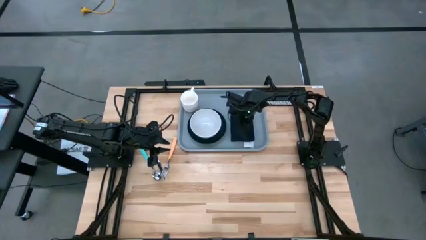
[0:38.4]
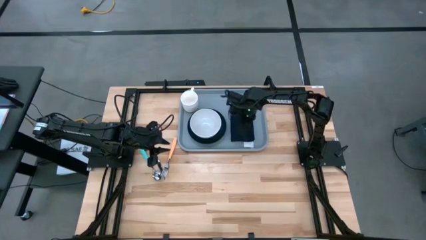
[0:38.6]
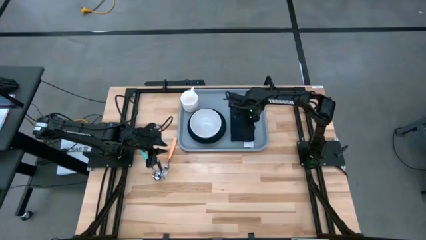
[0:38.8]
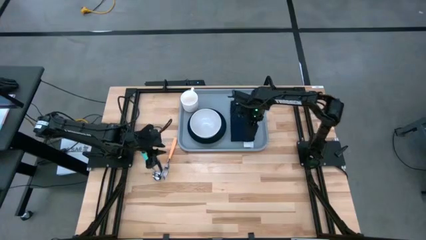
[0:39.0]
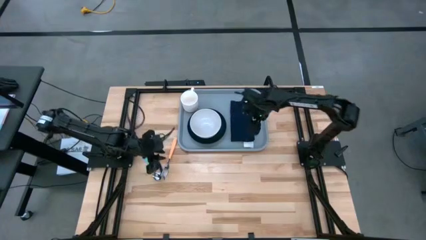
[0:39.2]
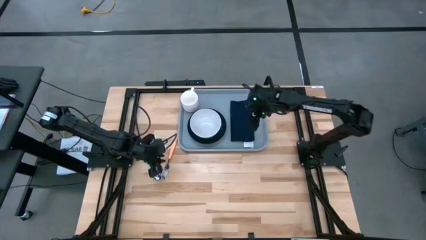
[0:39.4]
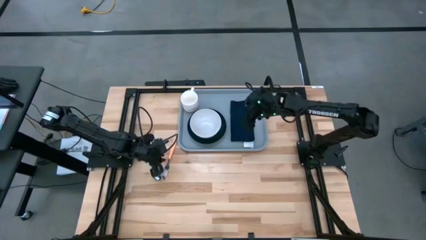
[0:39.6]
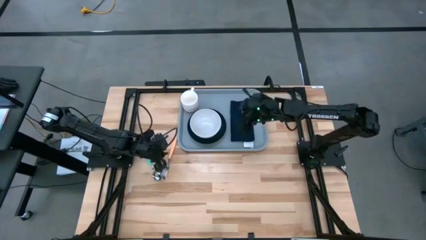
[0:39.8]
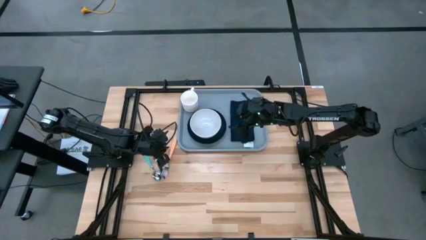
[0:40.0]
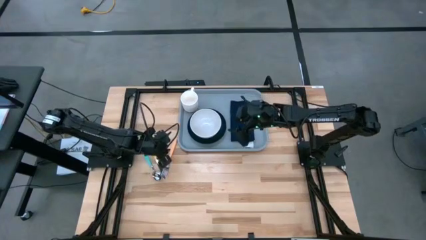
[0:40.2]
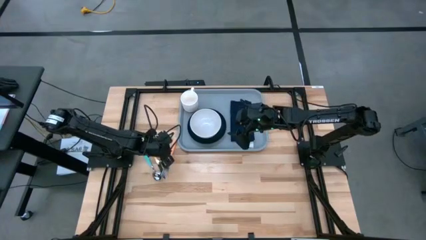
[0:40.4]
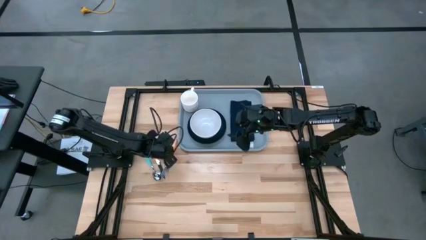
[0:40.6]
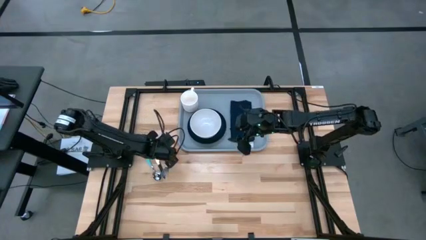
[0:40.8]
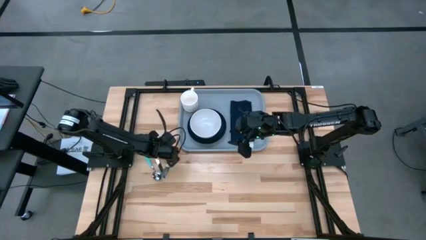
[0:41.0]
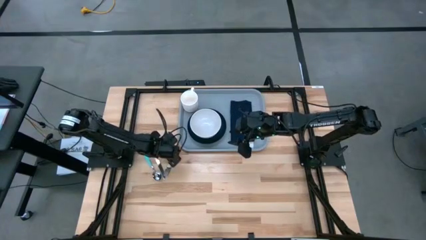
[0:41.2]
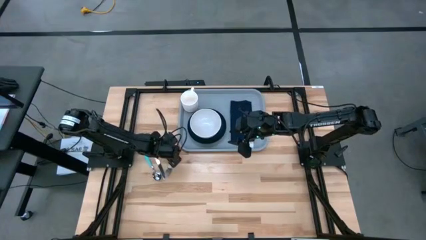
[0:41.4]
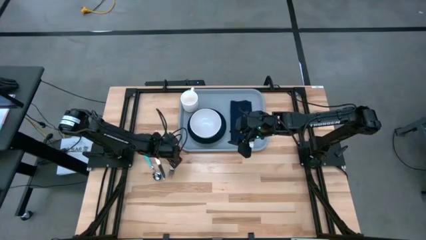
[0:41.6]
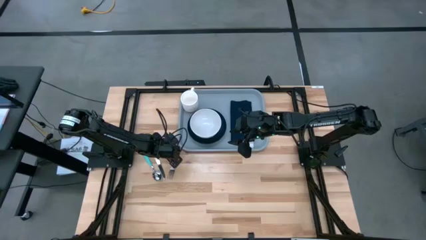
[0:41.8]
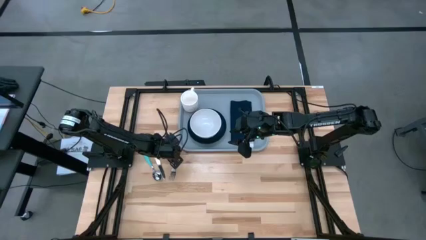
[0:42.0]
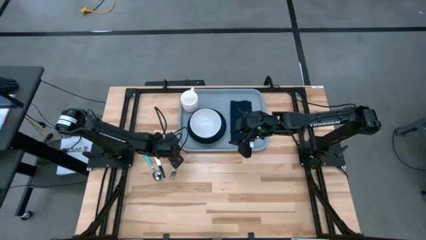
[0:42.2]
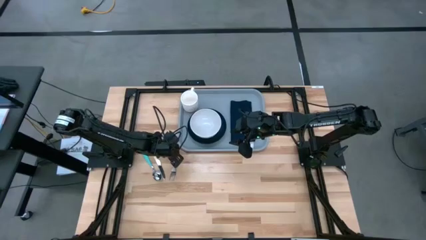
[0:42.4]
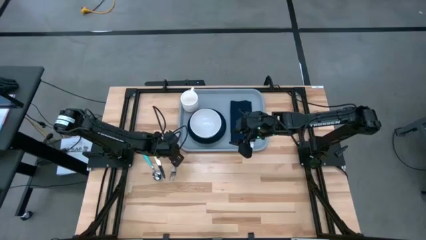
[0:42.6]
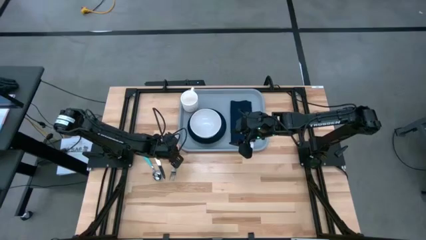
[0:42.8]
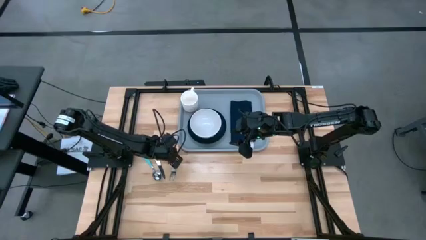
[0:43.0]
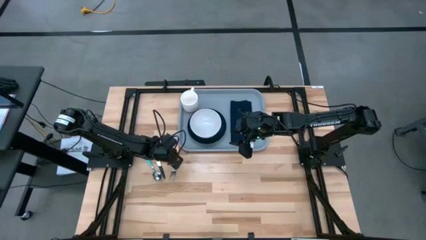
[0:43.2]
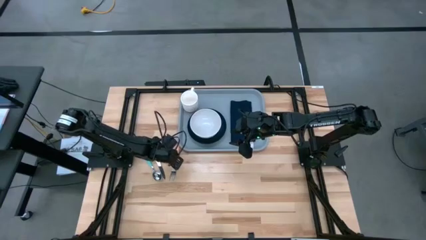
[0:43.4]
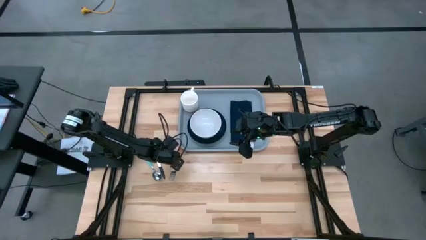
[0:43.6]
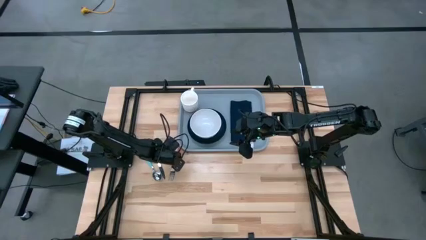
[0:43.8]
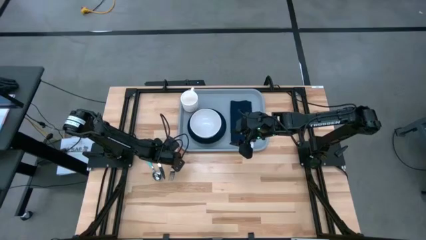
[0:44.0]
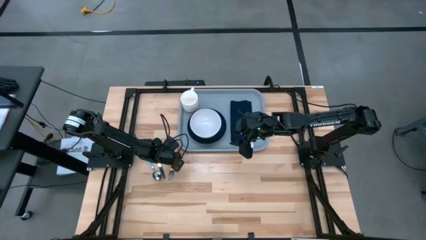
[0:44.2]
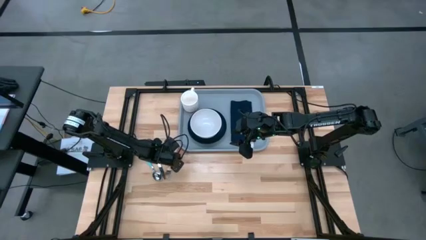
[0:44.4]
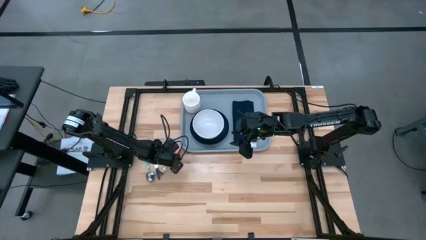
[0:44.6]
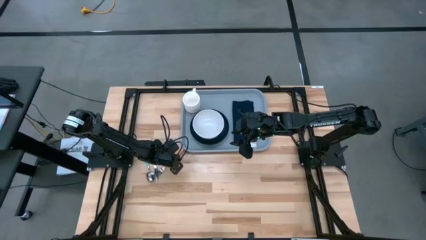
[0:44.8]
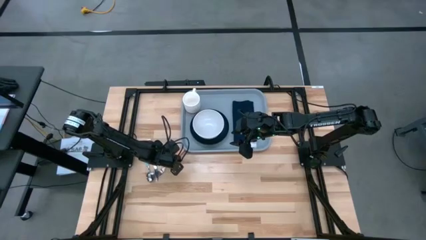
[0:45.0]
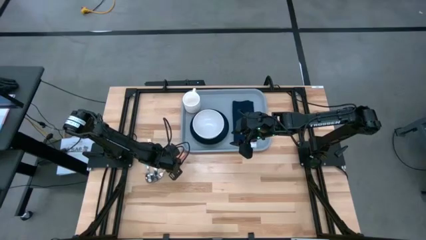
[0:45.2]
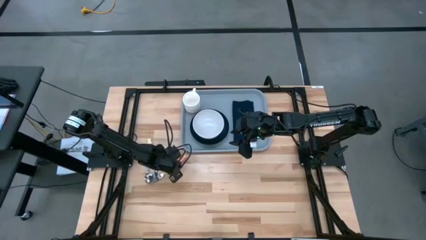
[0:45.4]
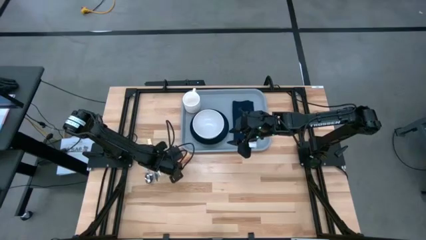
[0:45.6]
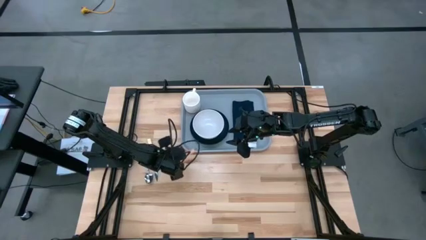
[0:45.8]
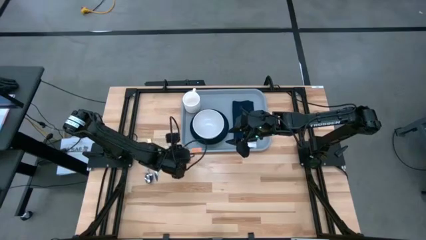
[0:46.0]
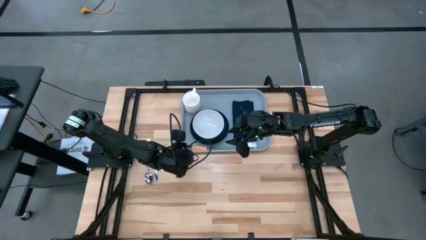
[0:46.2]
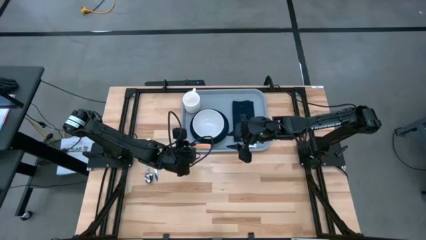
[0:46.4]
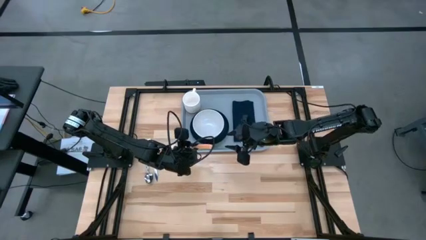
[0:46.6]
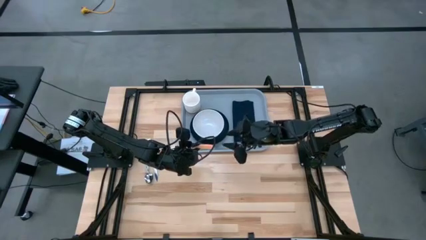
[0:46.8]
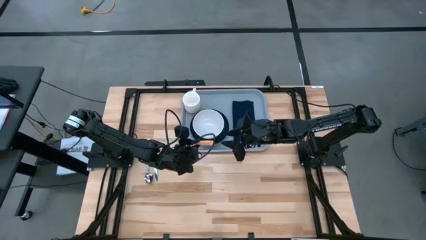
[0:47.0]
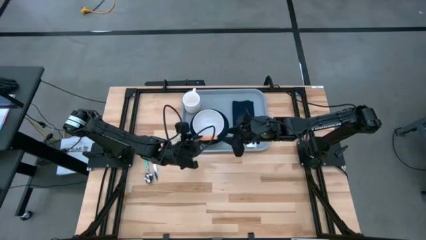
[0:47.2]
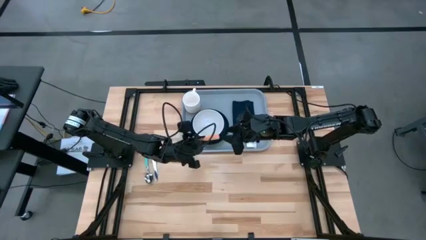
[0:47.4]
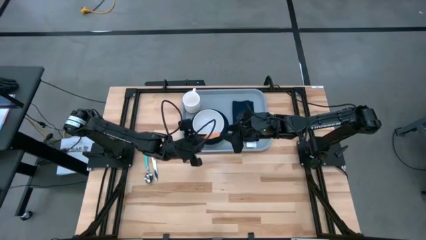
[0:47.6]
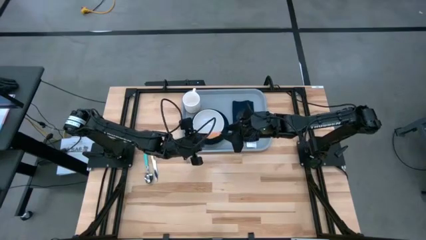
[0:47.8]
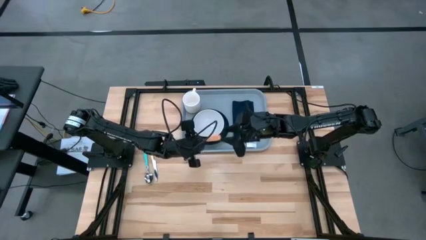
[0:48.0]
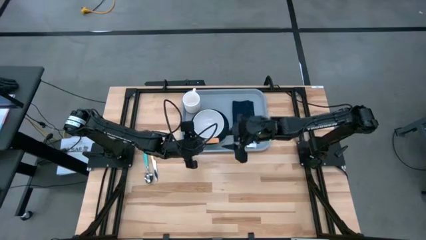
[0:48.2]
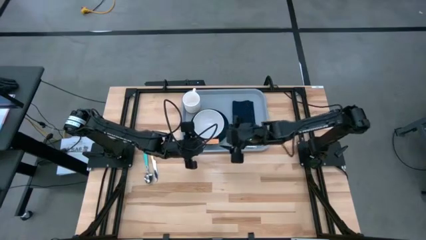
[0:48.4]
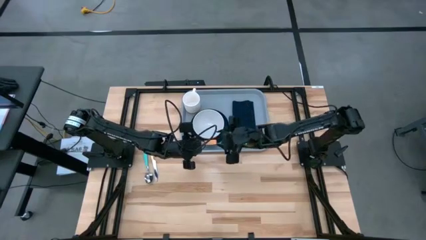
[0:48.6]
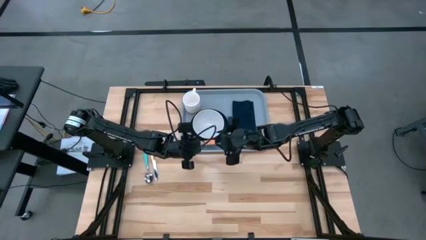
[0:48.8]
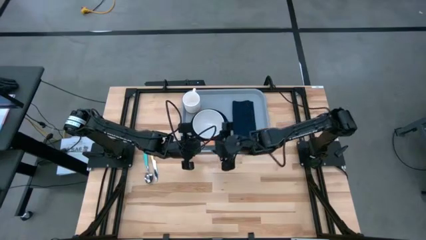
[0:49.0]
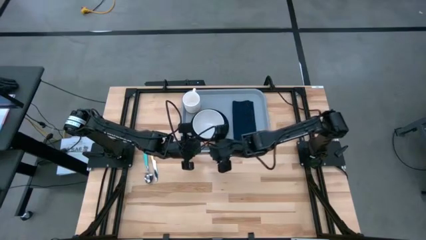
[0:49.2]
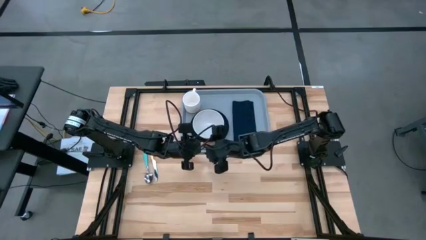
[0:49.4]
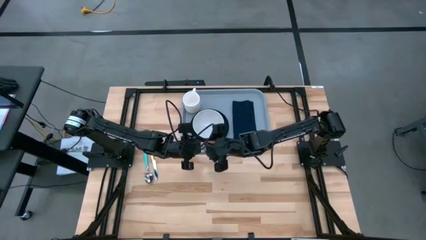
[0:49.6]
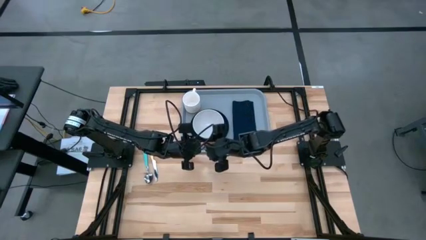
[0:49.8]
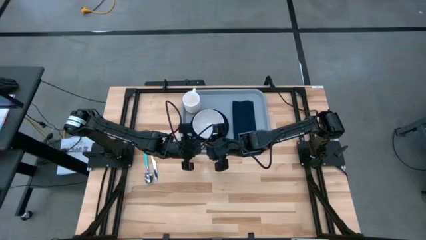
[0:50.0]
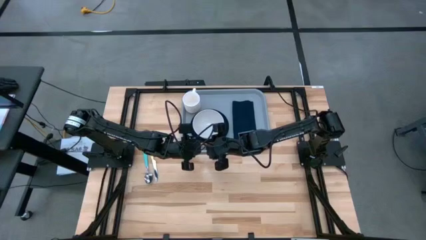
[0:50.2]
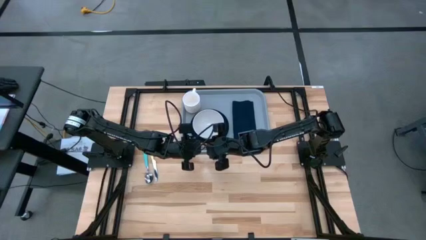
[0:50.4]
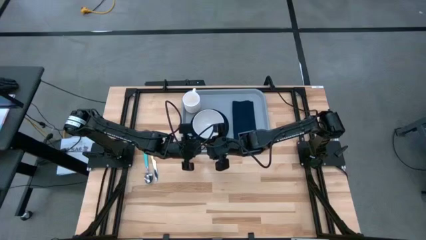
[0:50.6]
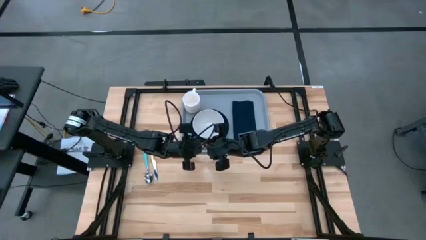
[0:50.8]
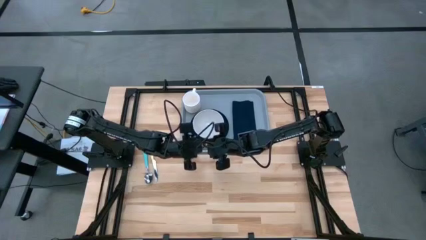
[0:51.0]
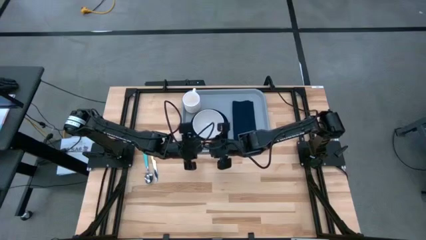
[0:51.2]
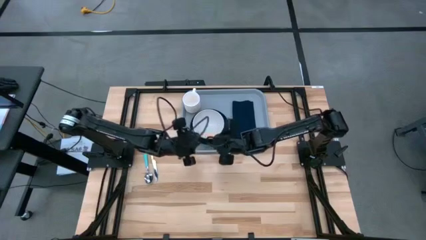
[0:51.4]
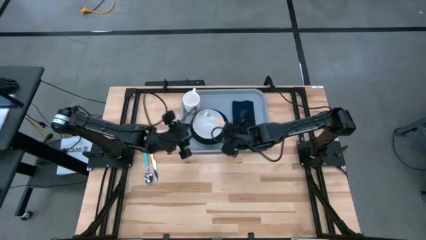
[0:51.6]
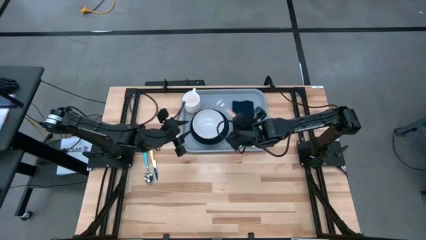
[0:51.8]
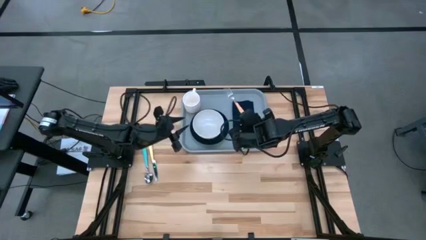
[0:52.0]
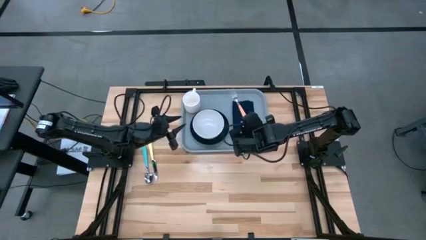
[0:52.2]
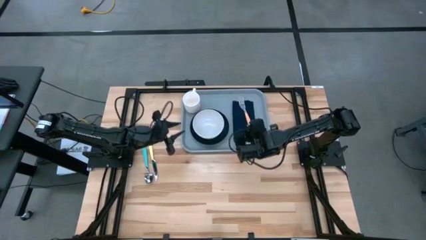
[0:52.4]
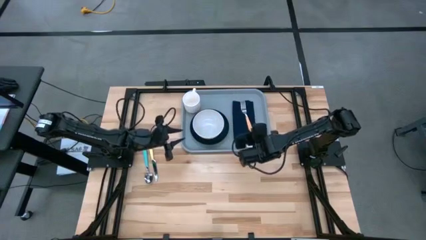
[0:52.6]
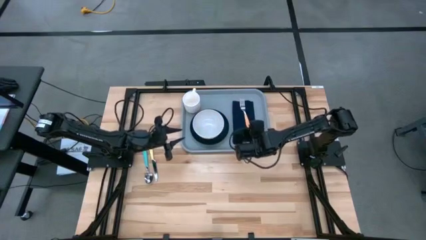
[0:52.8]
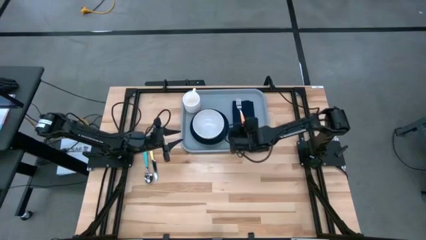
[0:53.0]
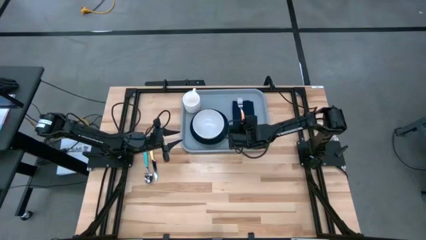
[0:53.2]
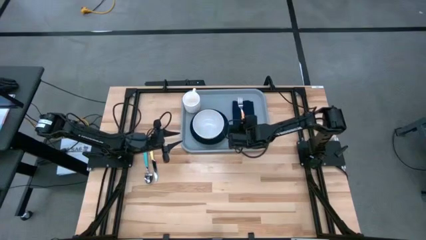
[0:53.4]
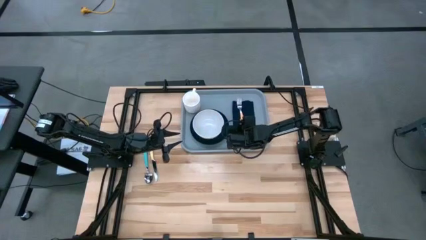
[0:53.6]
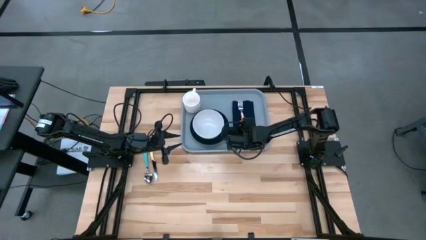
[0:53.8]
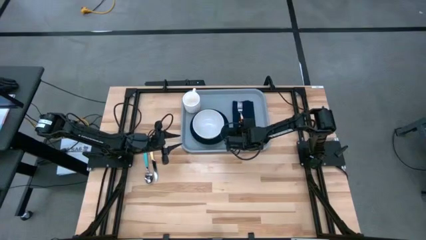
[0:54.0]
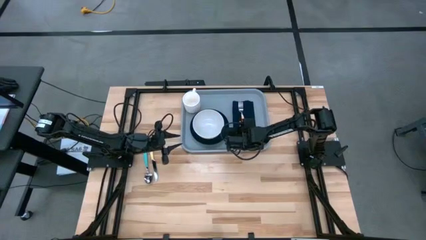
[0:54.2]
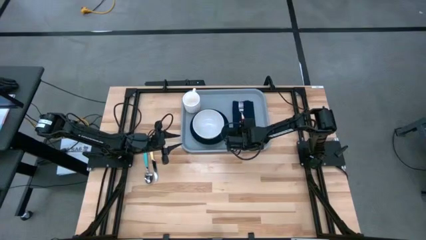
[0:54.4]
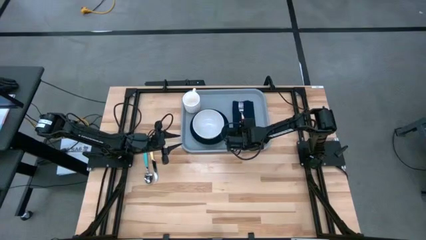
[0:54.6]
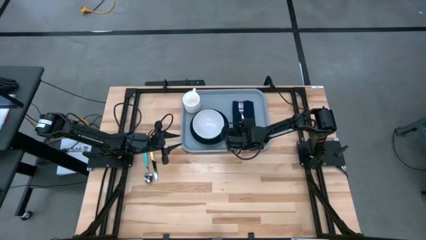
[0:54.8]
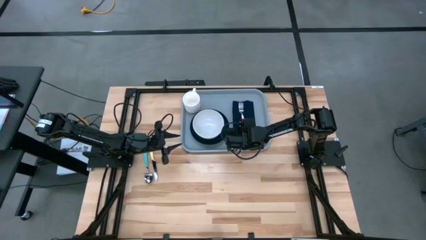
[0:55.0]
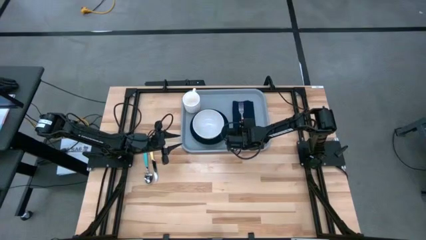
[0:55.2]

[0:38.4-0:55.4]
Task: Set up tray
Put the orange fork on top of the dark blue table napkin on the gray table tray
